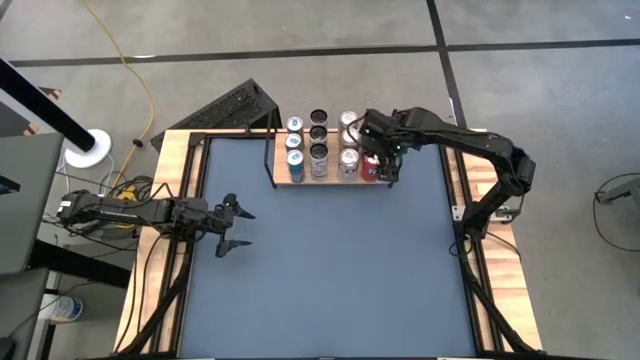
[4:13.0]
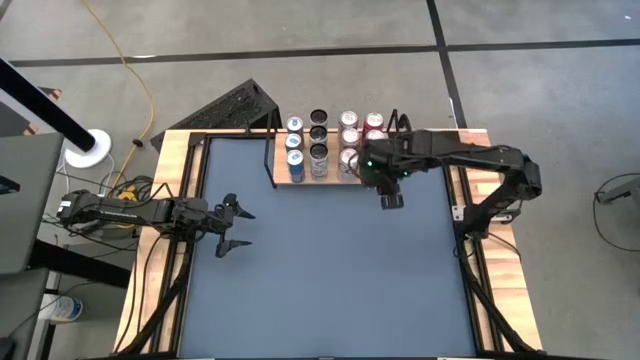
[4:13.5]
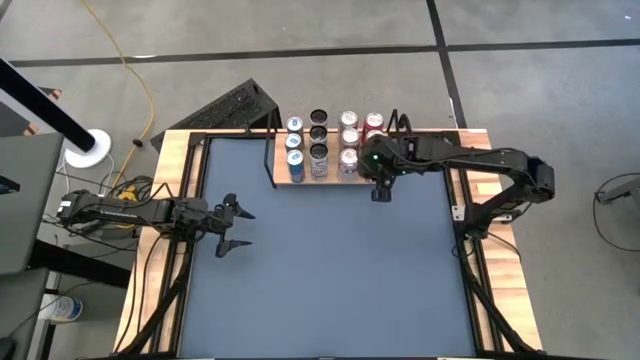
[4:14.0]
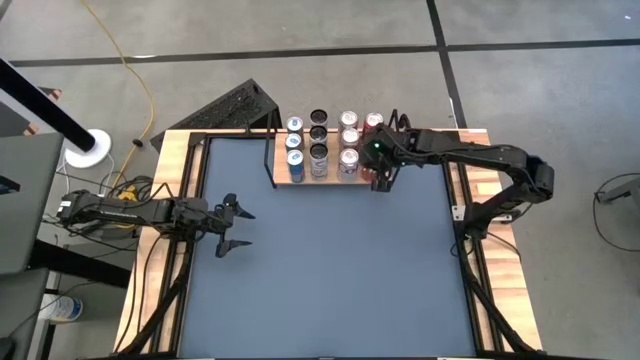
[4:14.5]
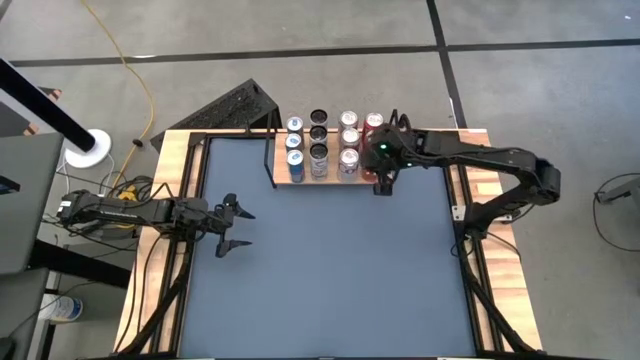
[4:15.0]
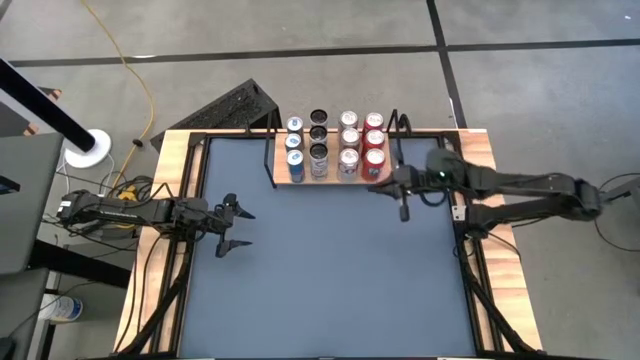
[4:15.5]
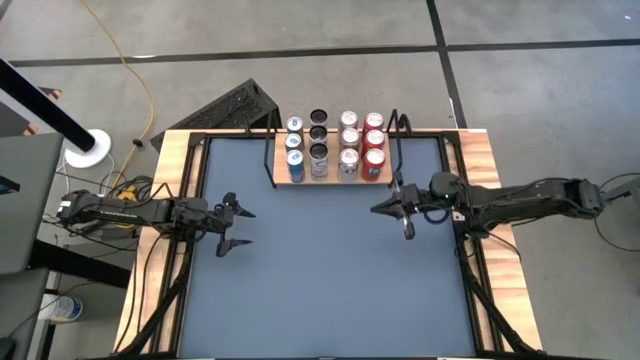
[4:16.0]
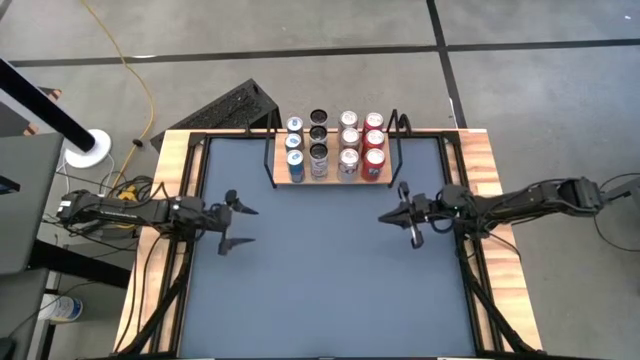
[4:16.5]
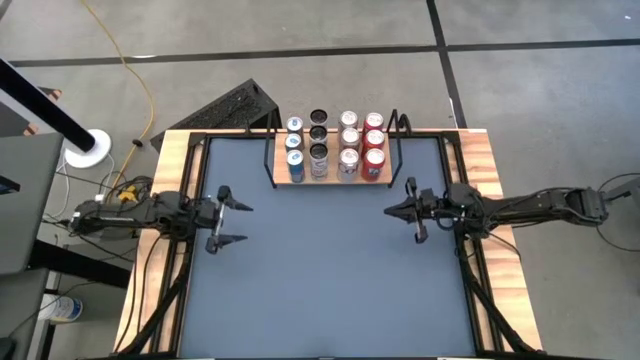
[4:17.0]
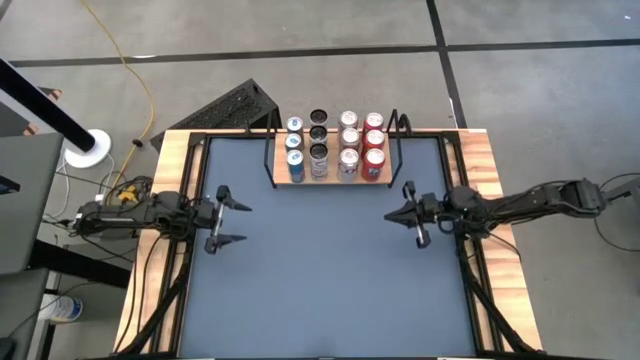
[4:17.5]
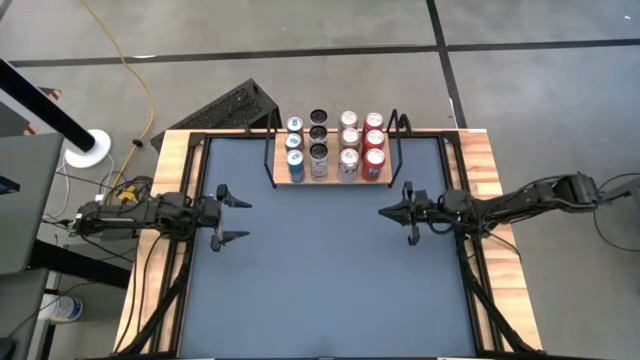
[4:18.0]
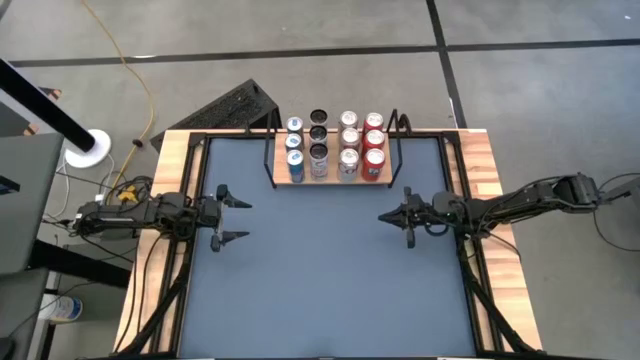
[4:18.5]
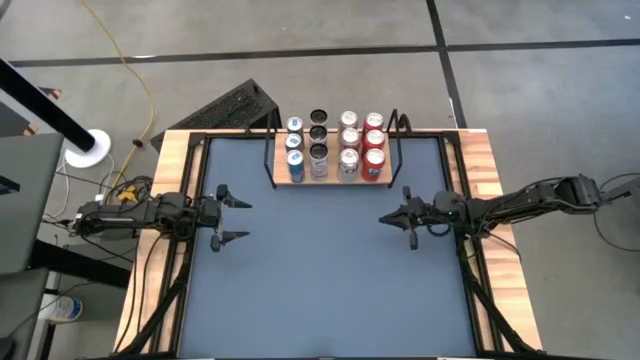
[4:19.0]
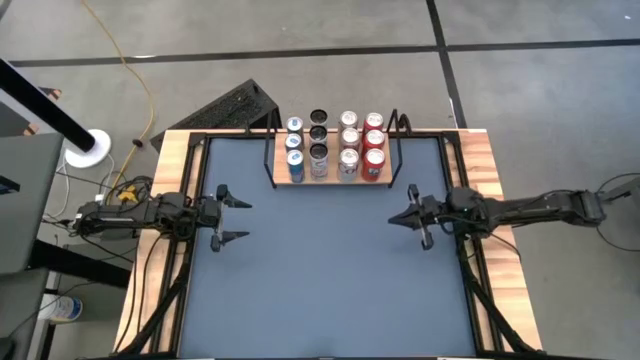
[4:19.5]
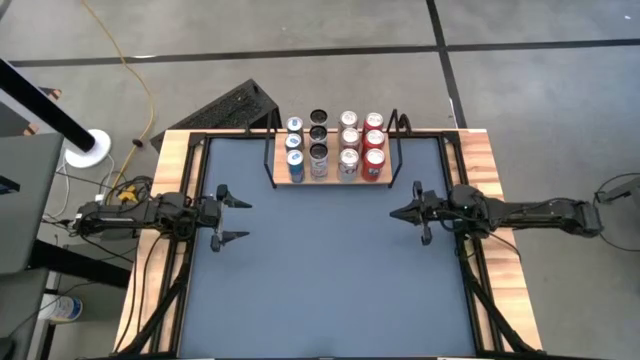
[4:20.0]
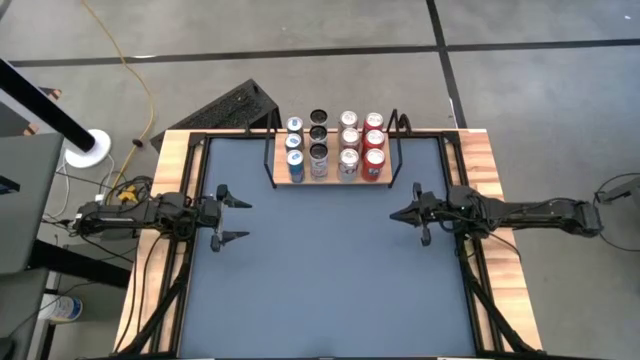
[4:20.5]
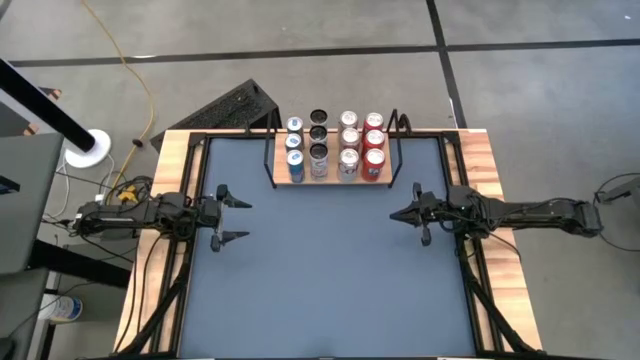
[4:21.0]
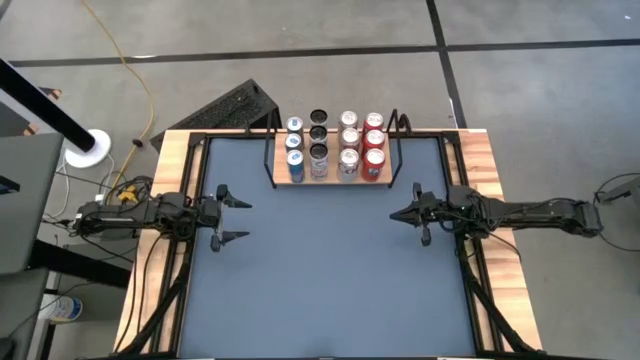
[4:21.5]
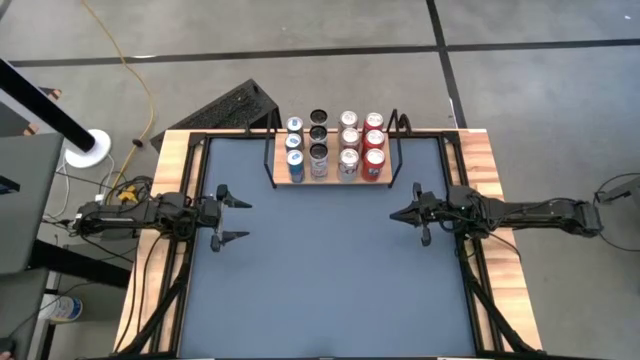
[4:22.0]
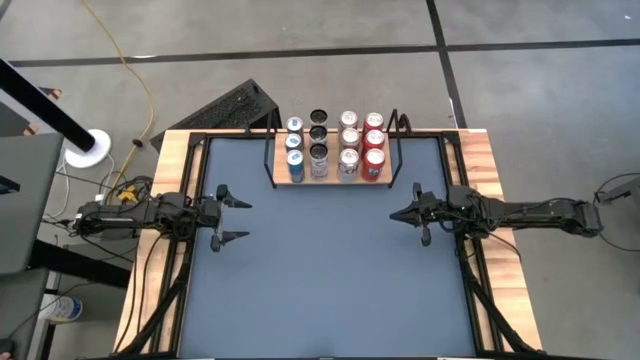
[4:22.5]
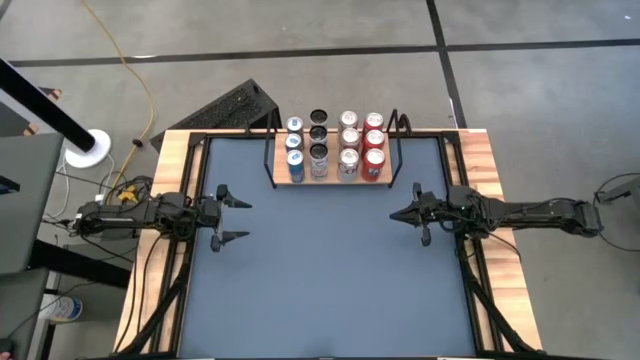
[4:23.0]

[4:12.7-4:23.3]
Task: Place canned beverage on shelf
Return to Home Position

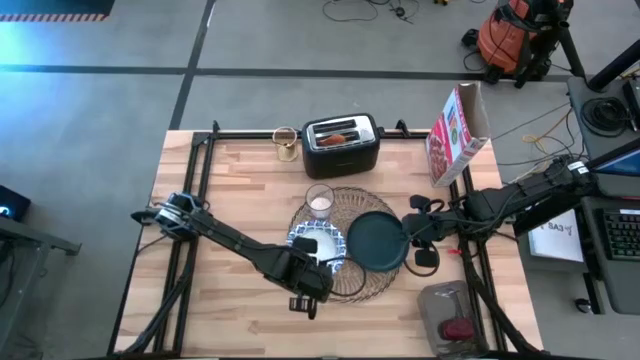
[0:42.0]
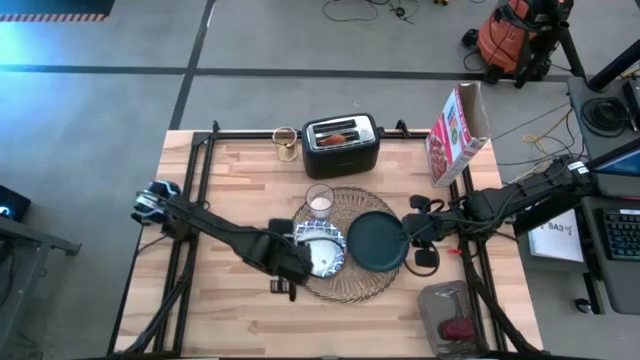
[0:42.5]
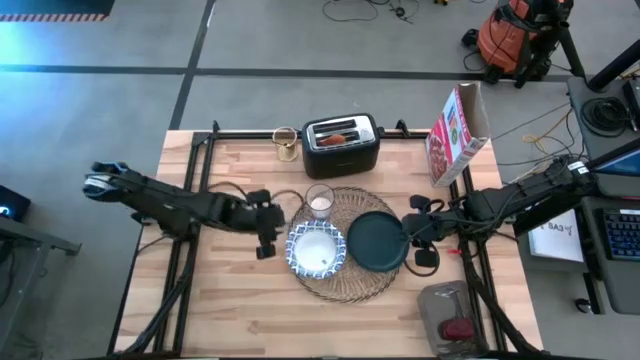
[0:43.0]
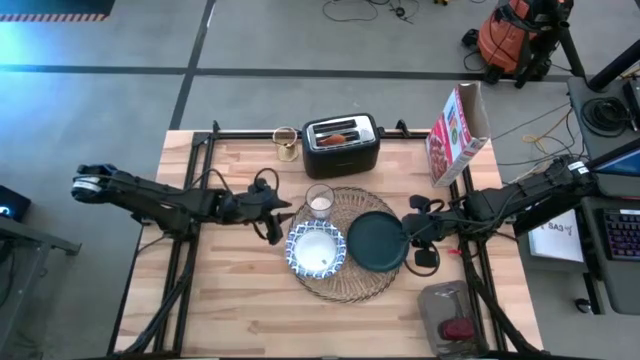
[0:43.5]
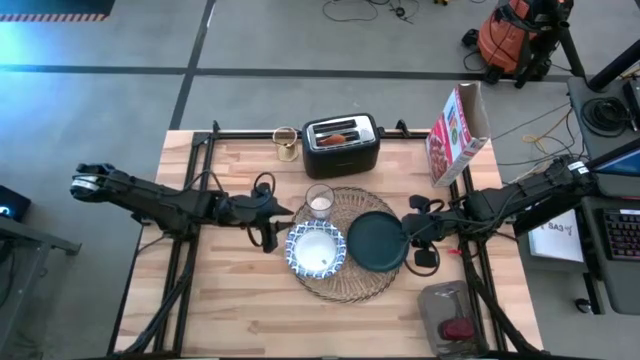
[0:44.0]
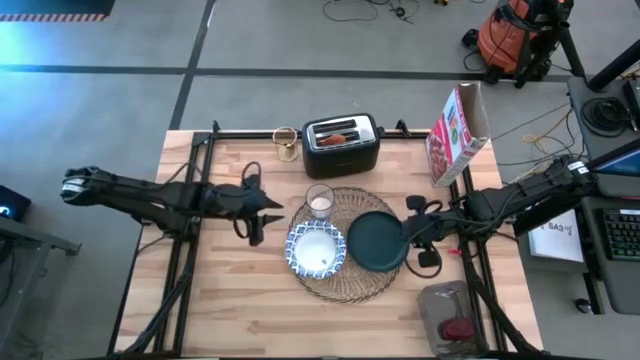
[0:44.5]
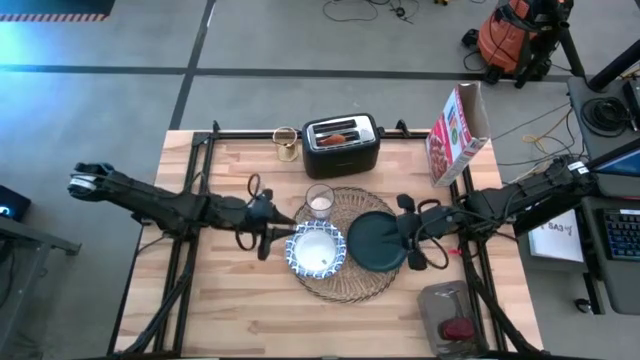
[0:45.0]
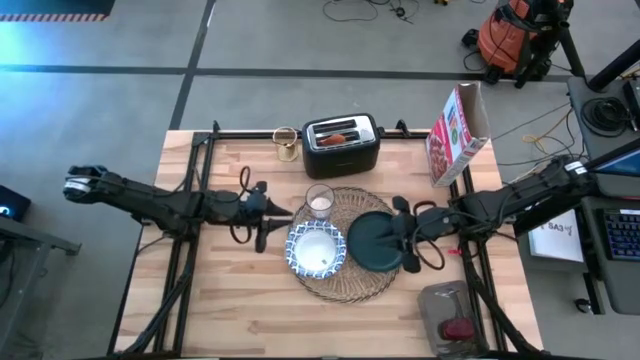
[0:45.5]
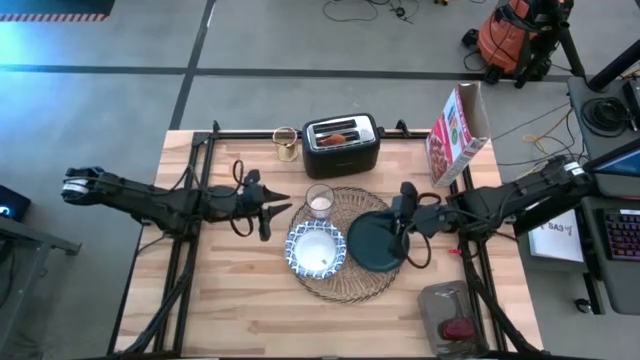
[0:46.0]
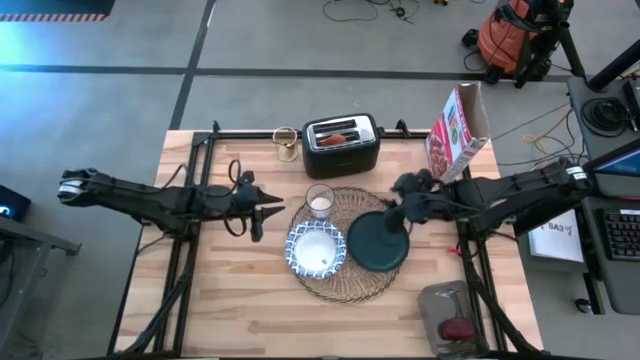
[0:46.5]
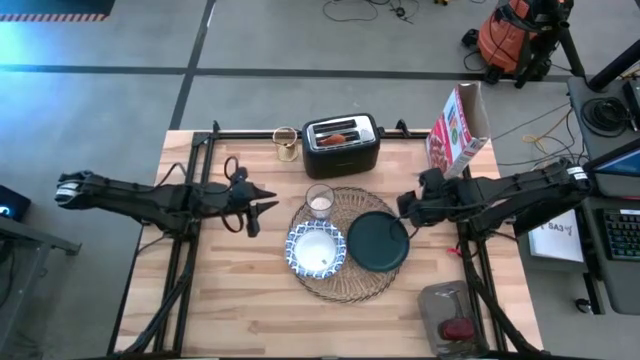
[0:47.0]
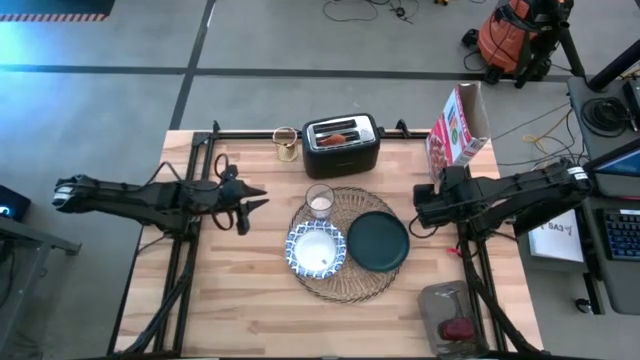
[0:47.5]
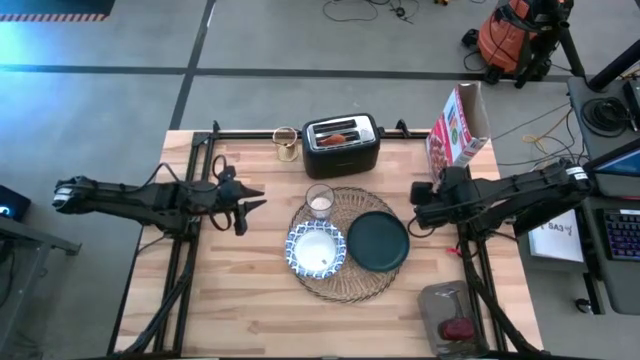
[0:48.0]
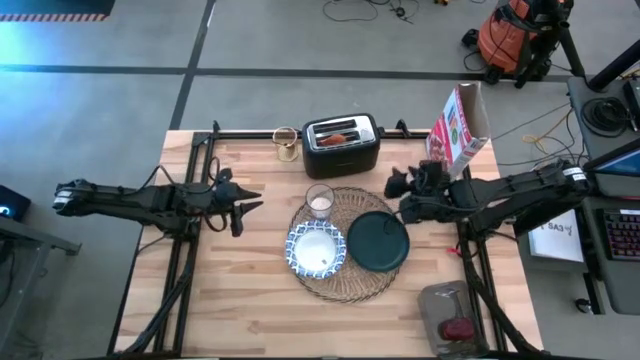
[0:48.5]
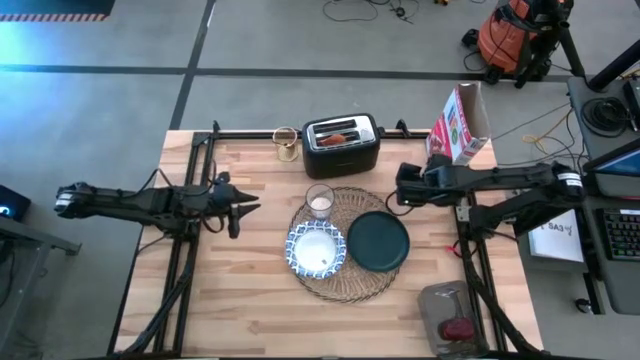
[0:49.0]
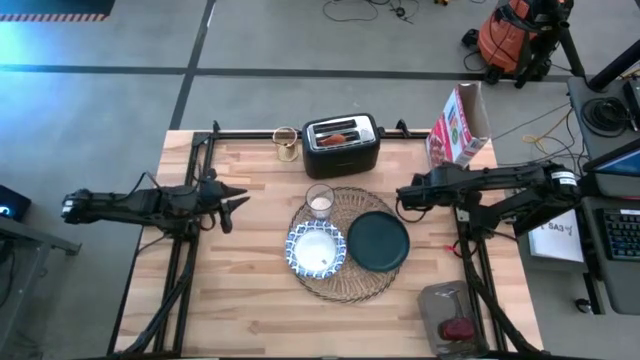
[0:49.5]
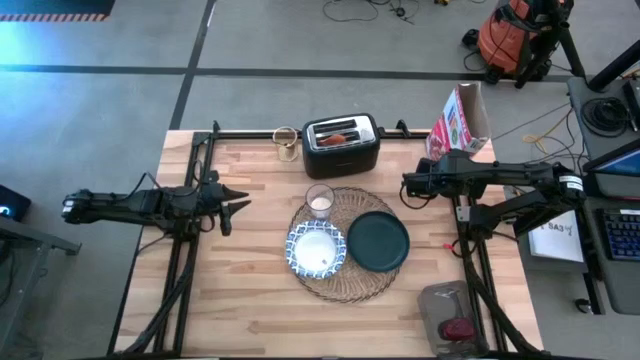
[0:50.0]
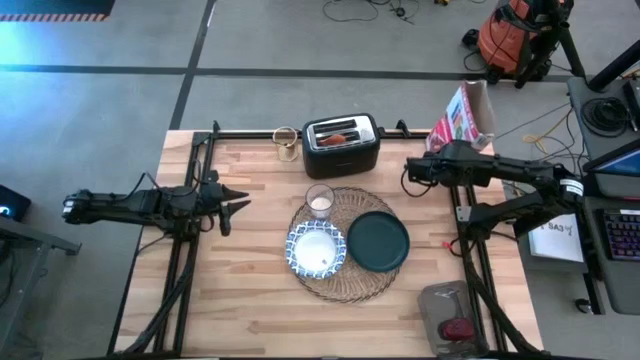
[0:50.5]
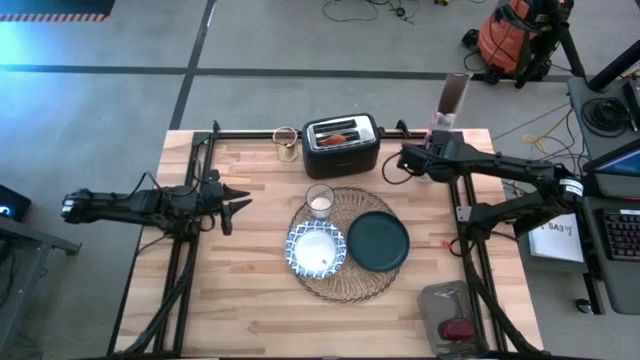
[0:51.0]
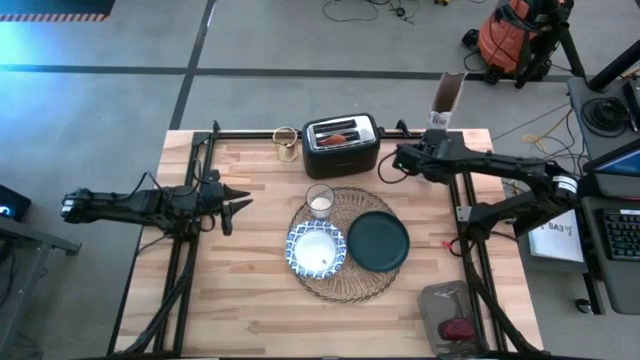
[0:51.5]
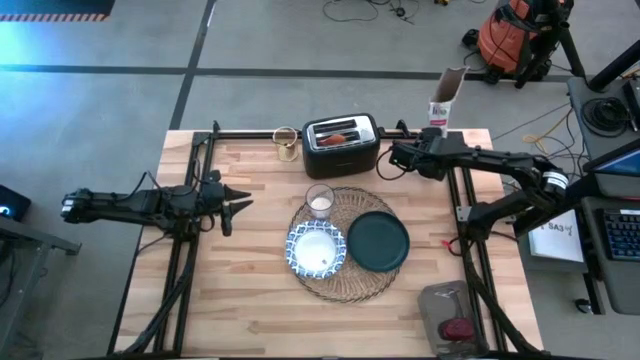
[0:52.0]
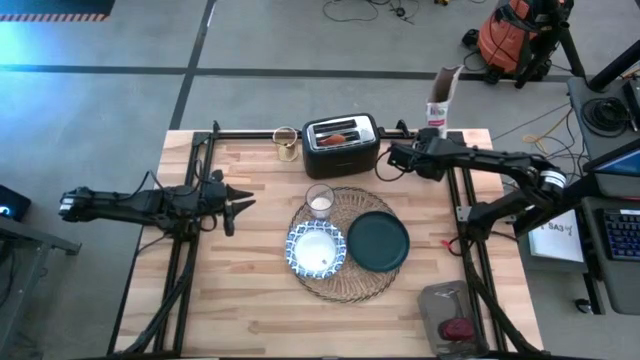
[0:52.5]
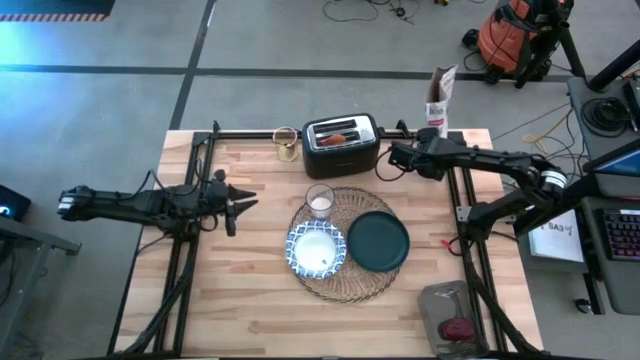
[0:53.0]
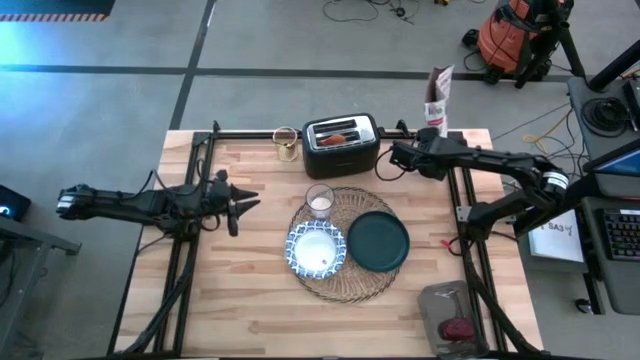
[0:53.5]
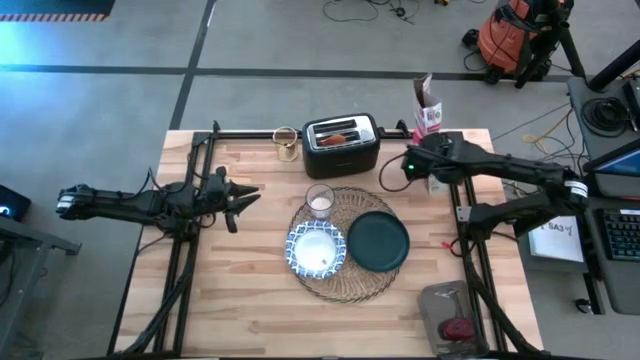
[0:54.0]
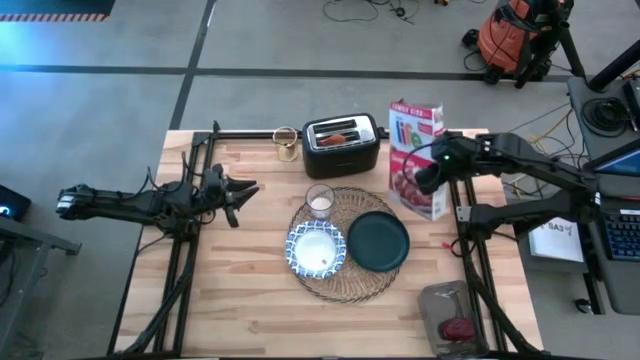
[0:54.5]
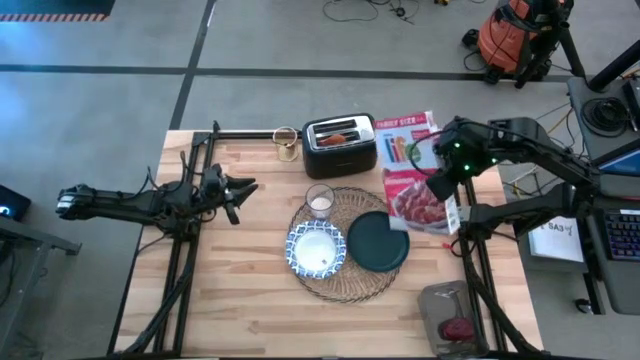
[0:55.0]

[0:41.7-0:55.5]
Task: Arrange a breakfast setting
Pour the cereal into the white and blue bowl
